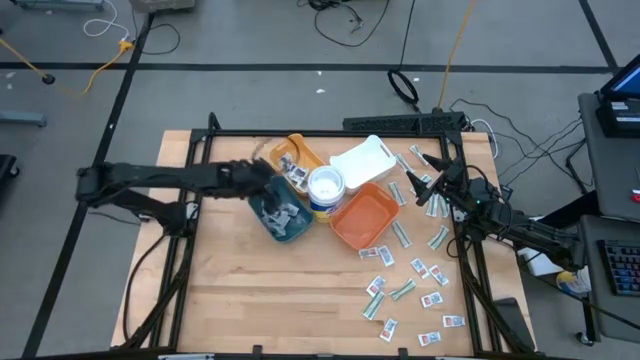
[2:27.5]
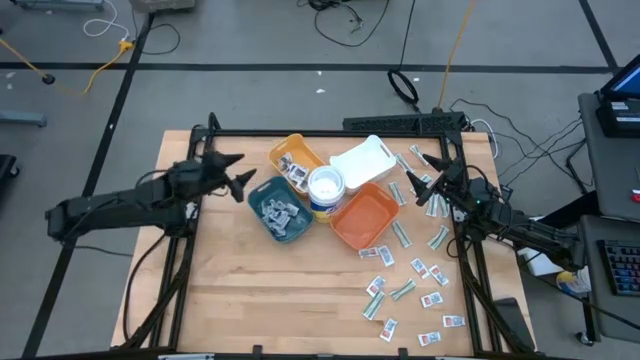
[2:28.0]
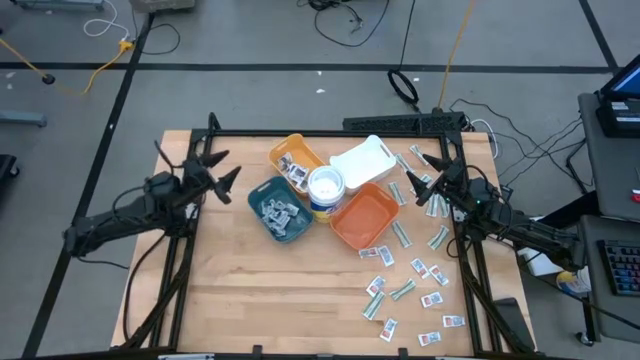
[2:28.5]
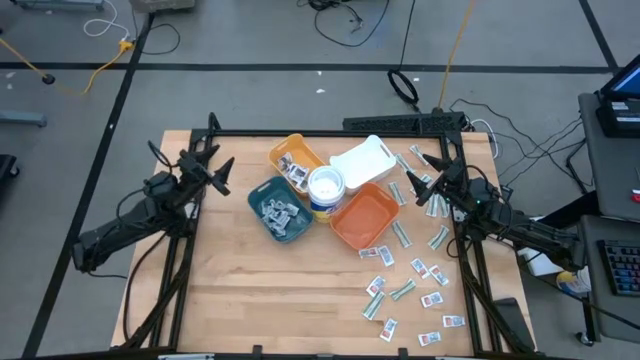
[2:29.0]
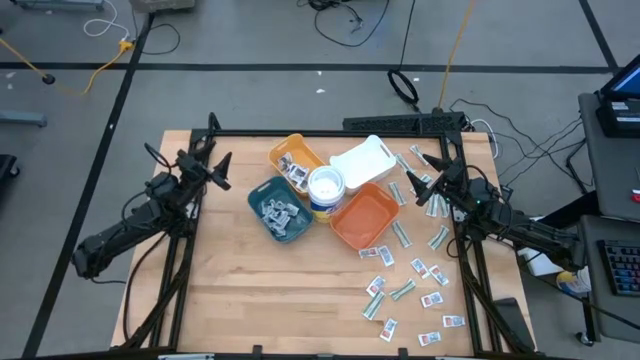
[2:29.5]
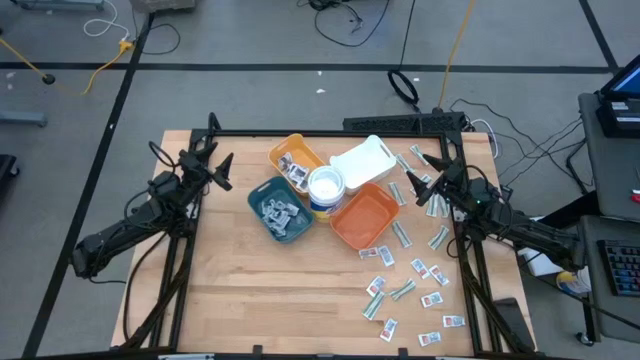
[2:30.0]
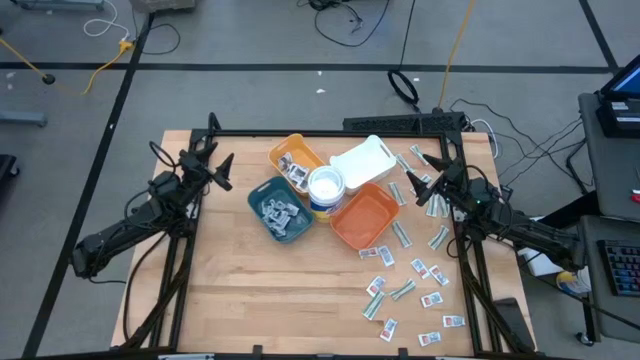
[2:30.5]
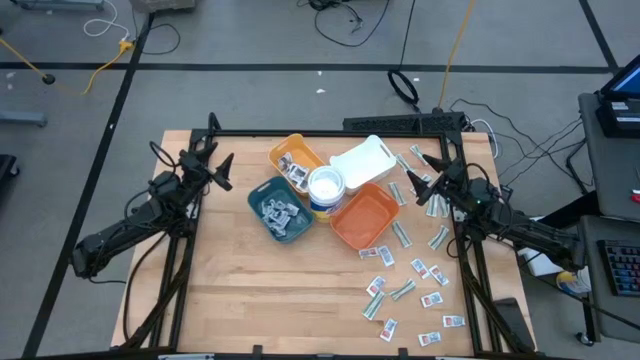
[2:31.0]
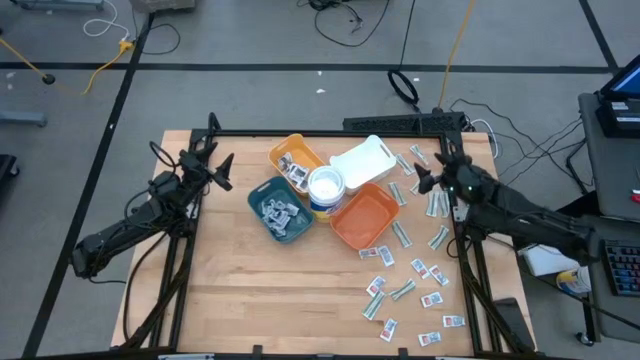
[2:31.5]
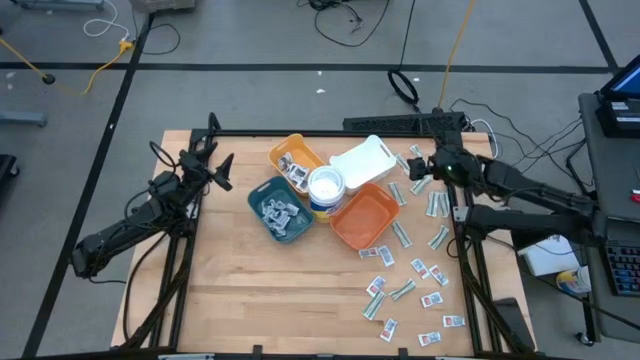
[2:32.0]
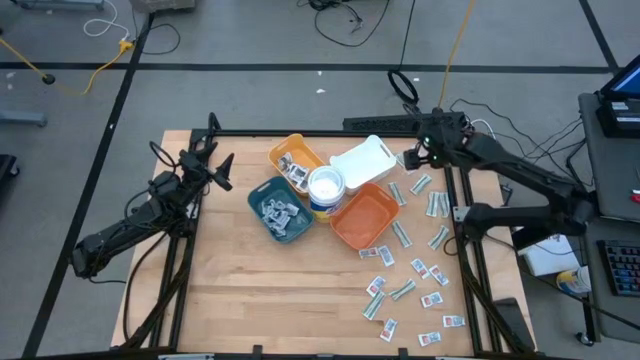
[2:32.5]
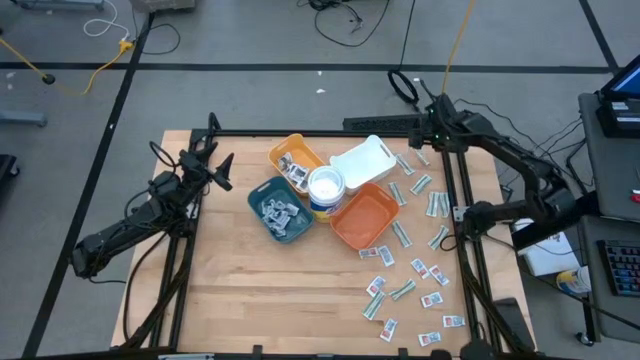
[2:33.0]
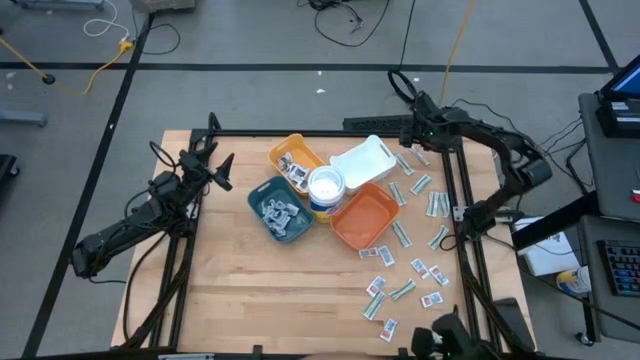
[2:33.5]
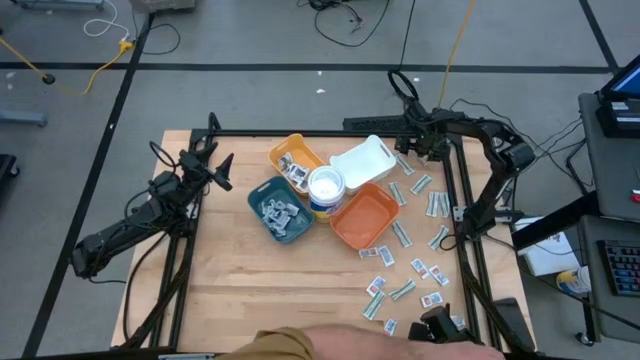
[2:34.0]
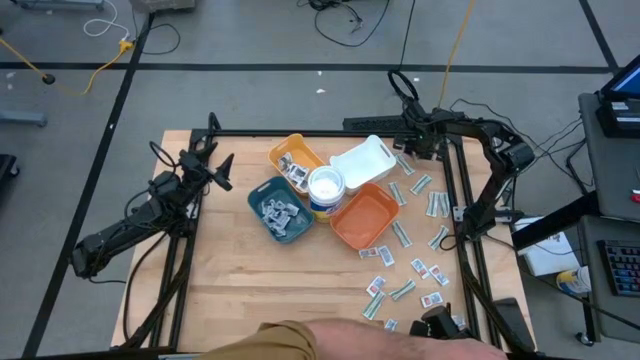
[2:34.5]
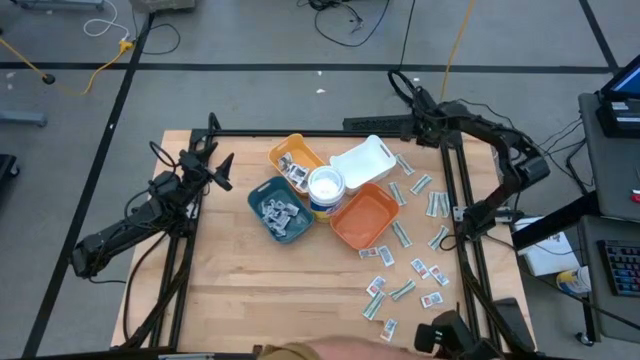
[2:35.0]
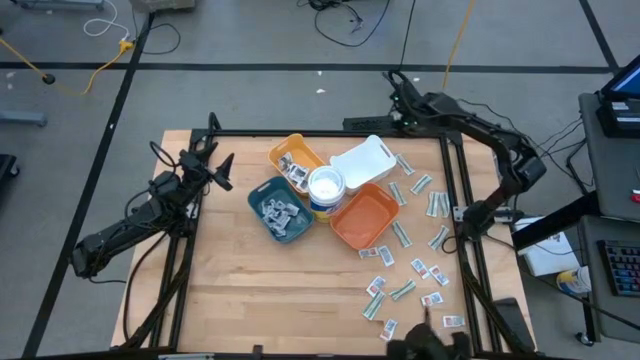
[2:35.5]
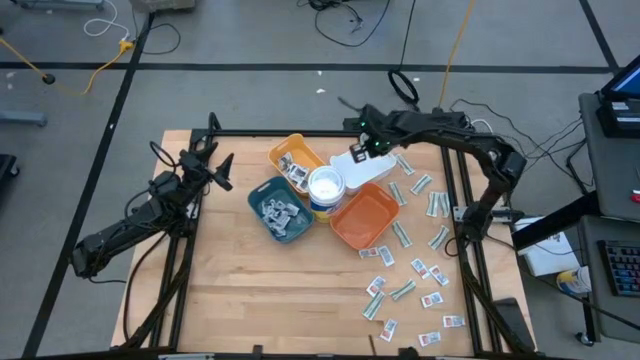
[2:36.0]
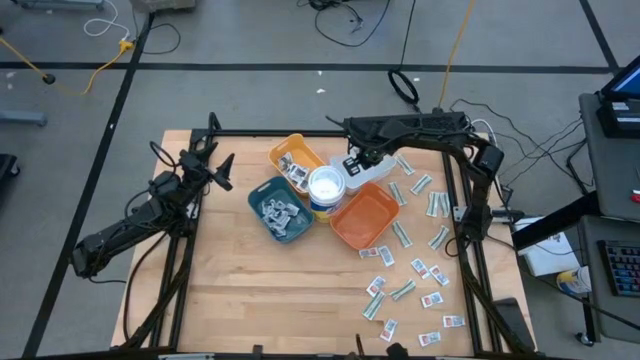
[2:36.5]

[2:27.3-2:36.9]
Task: Pick & Place First Aid Supplies
Put the green bandage into the white bin

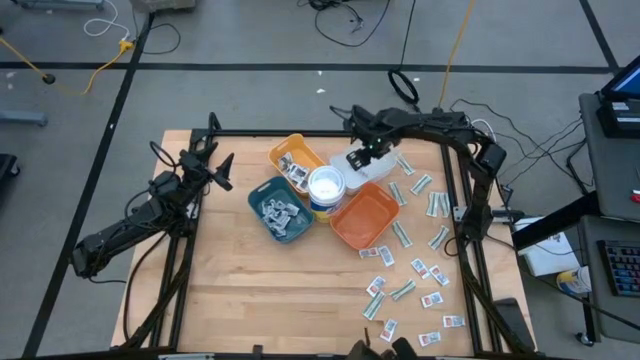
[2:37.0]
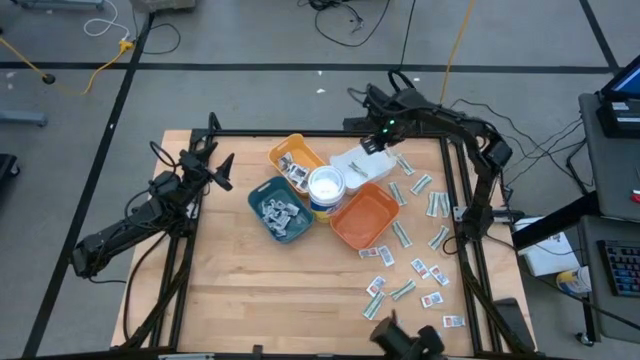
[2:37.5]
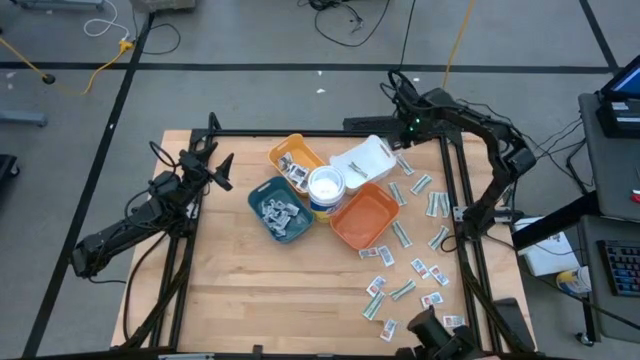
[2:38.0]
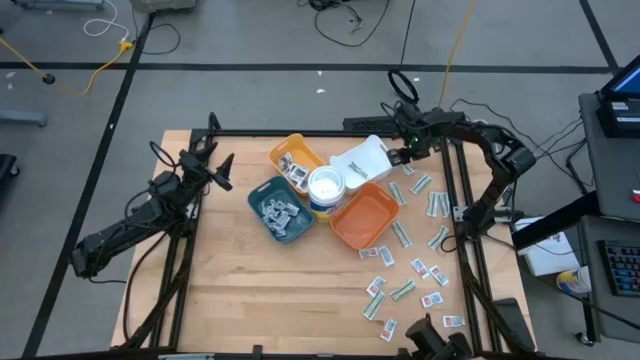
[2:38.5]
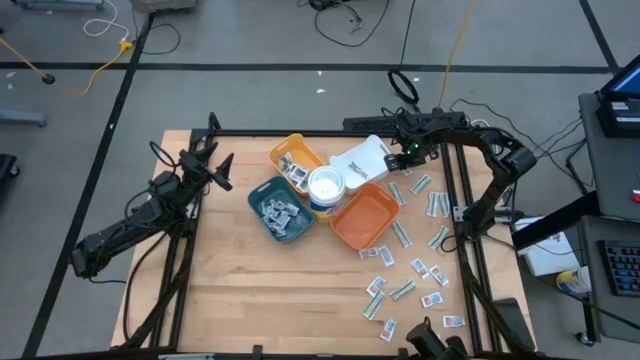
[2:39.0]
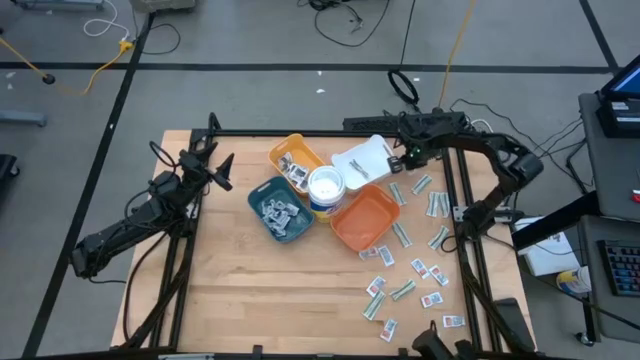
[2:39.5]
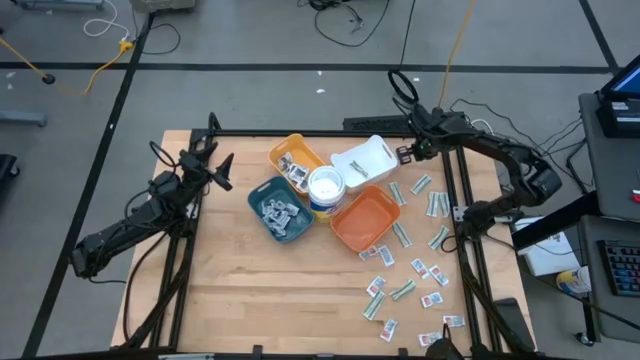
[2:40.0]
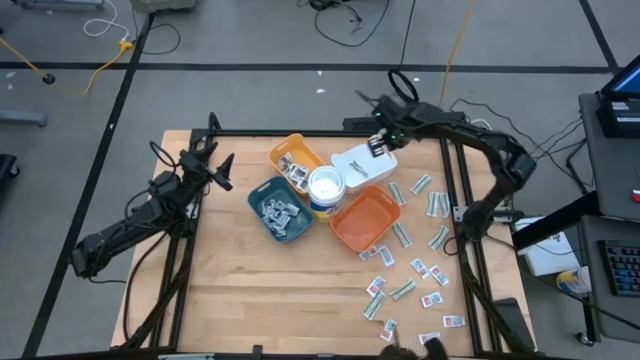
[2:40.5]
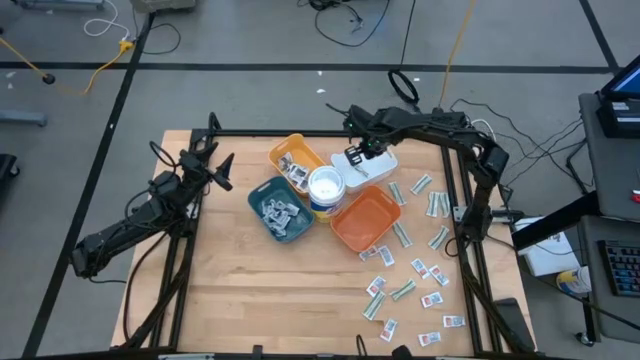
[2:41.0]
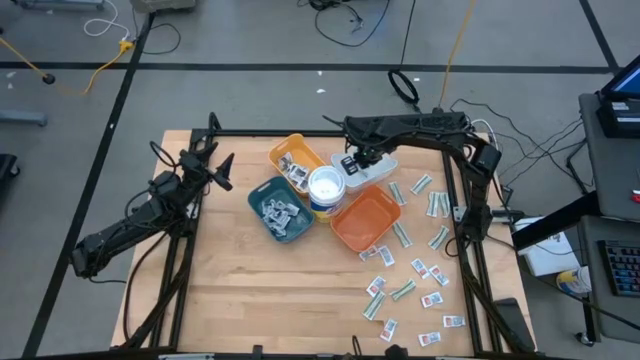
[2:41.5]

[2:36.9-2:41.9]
Put the green bandage into the white bin

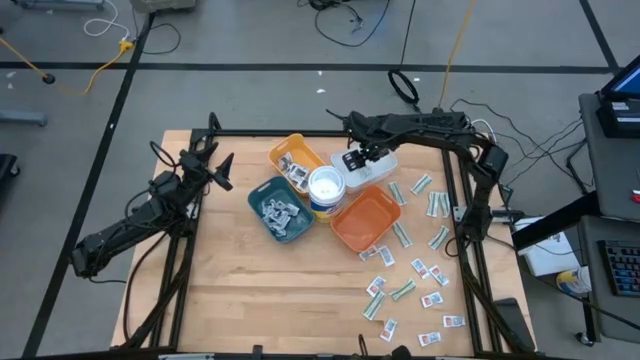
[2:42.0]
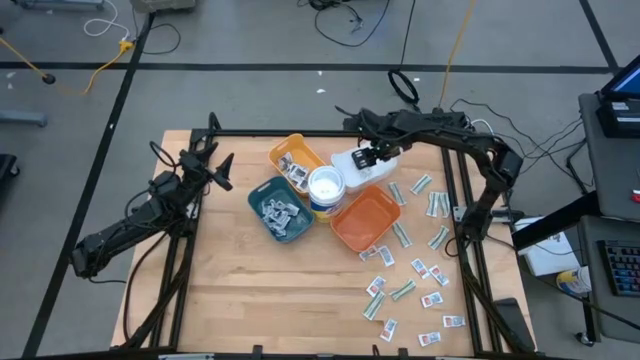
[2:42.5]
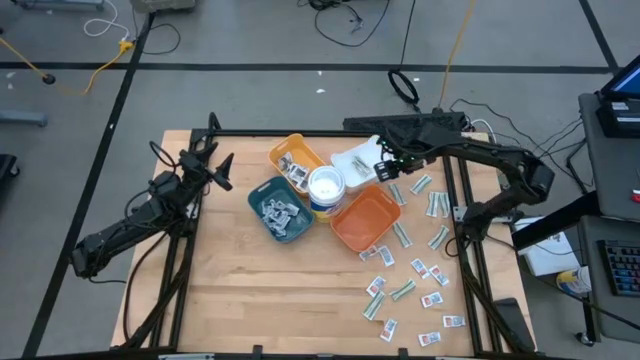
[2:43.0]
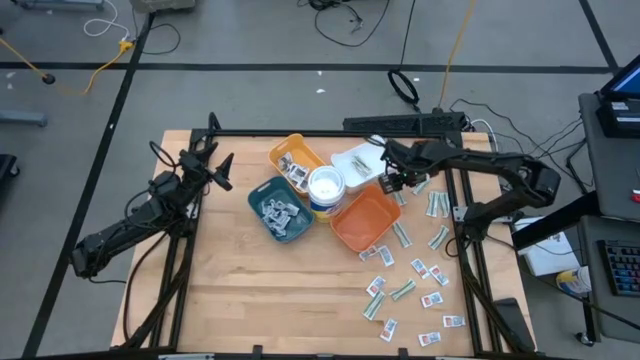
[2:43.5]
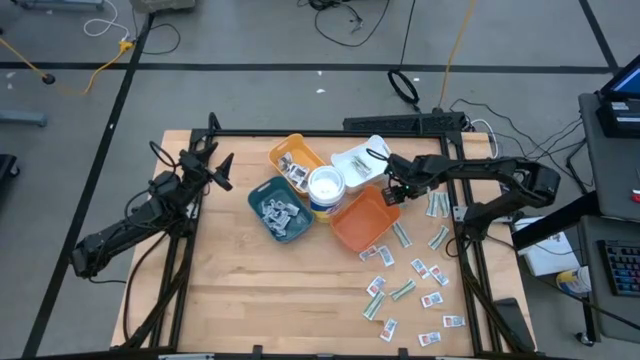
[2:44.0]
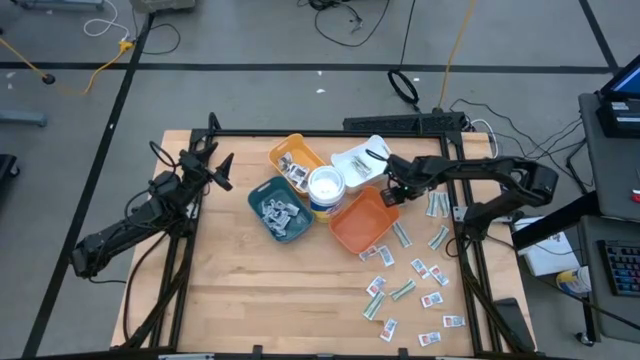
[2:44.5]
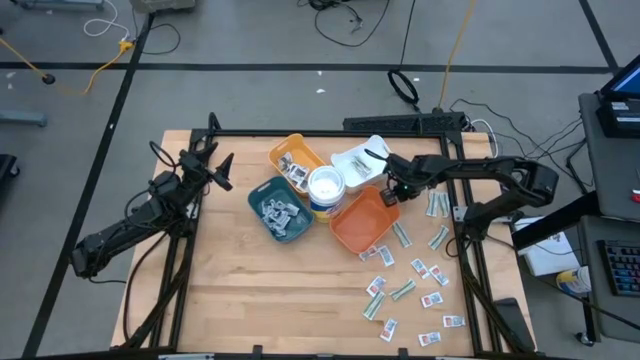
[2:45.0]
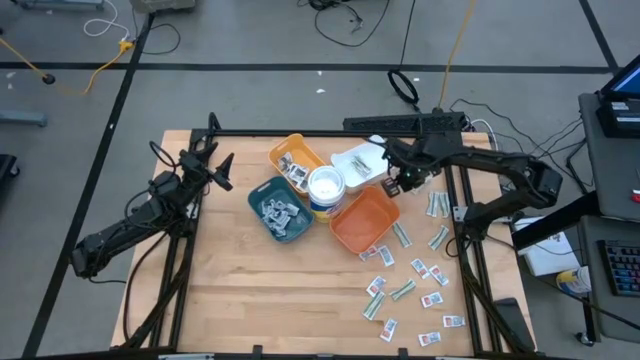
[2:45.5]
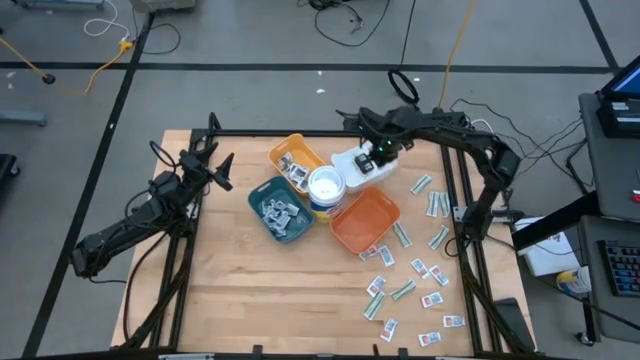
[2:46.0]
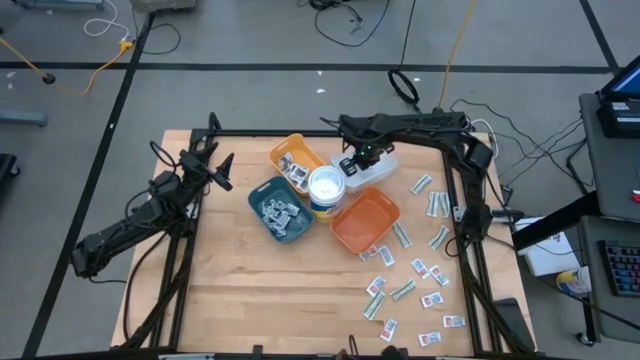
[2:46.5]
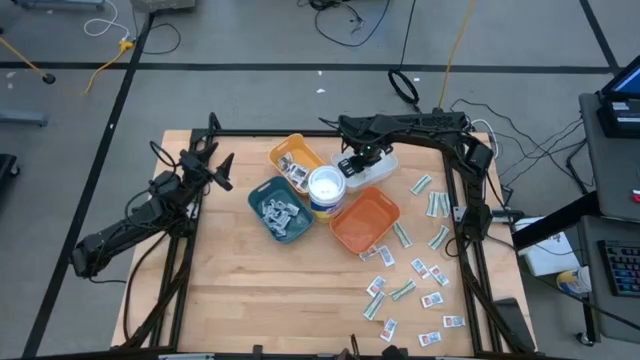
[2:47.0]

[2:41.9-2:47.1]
Put the green bandage into the white bin

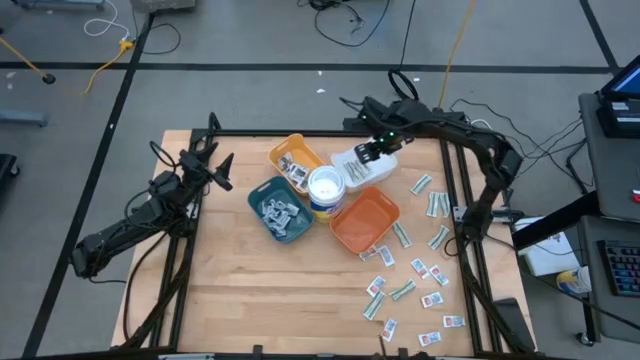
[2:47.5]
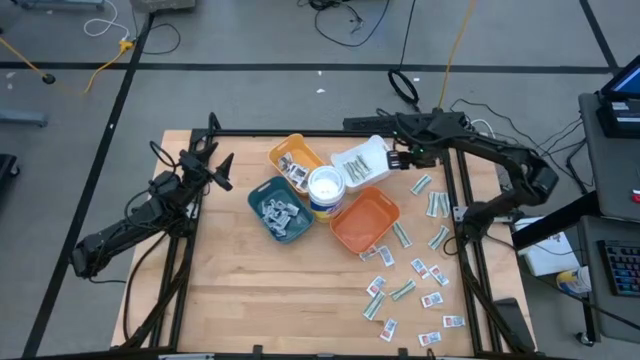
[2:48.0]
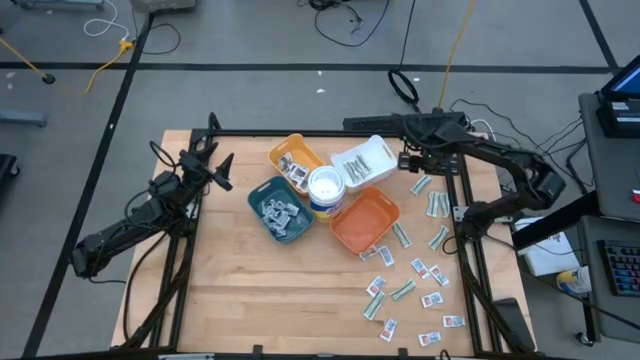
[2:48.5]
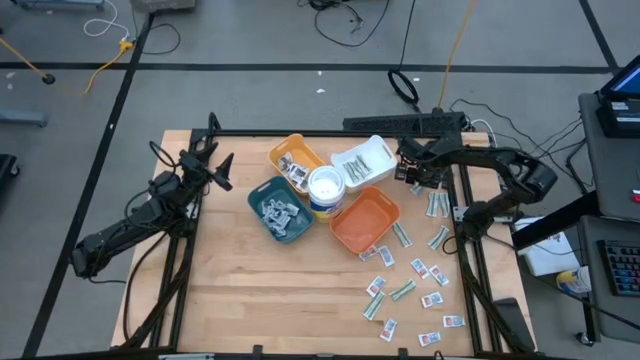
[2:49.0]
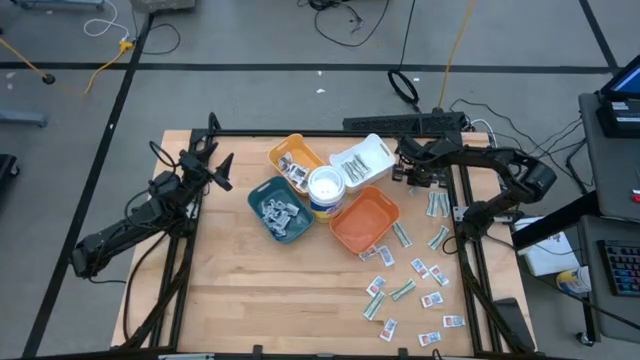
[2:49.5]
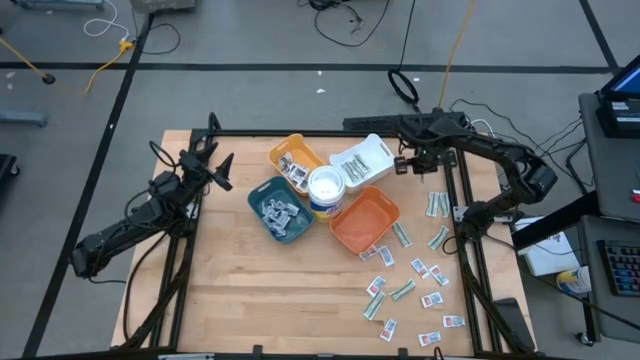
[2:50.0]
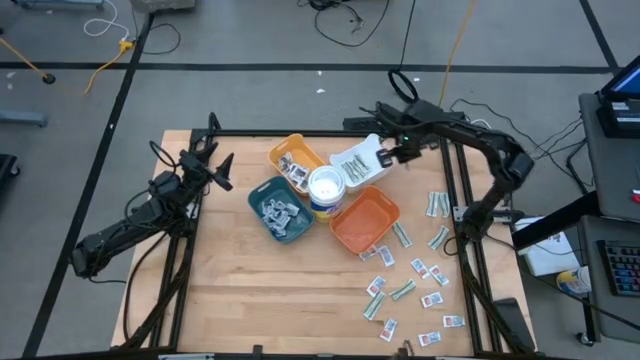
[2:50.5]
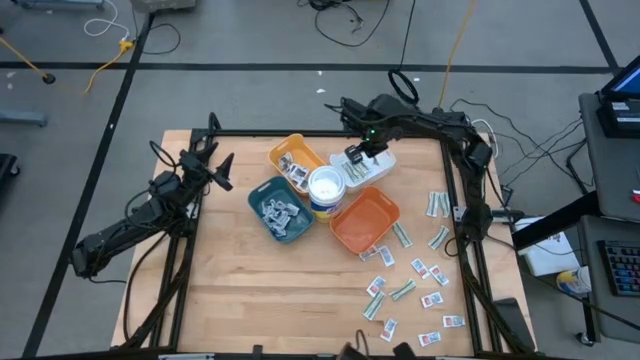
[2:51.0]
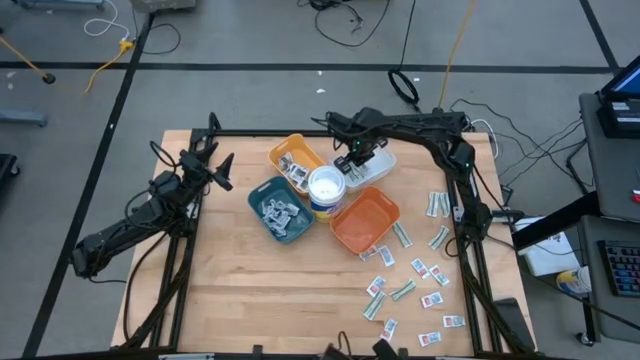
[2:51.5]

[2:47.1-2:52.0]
Put the green bandage into the white bin
